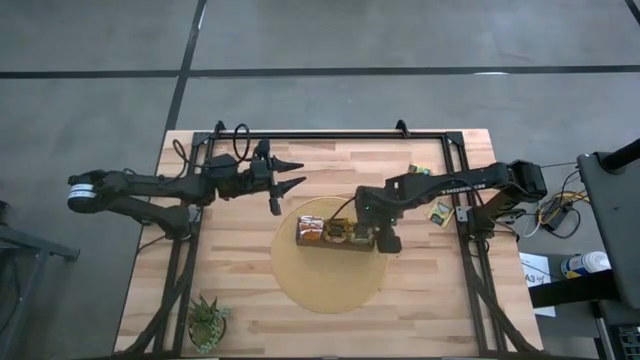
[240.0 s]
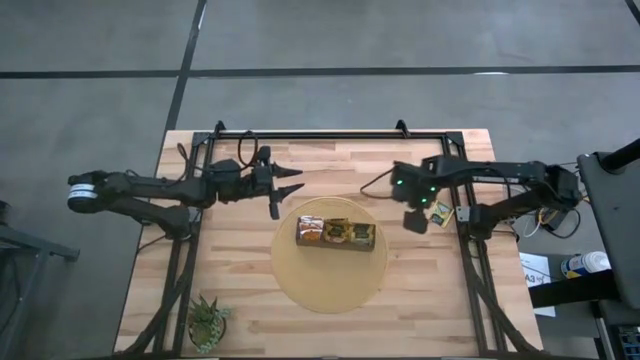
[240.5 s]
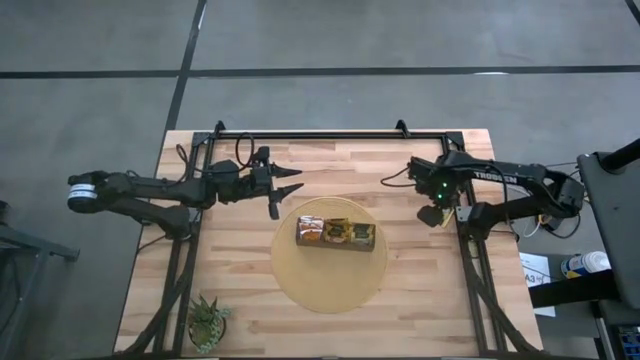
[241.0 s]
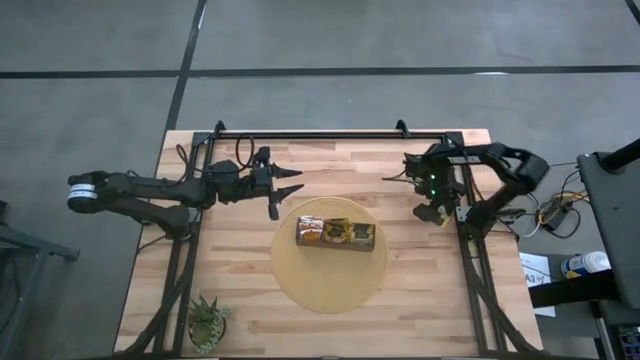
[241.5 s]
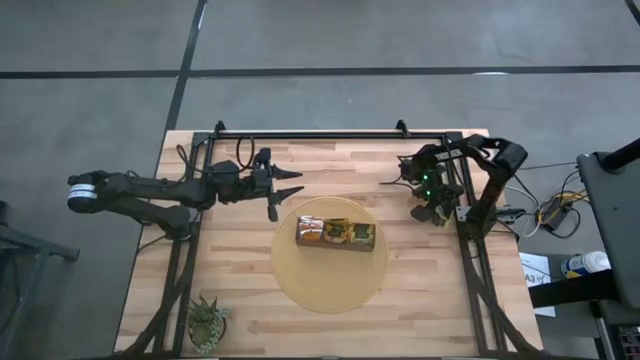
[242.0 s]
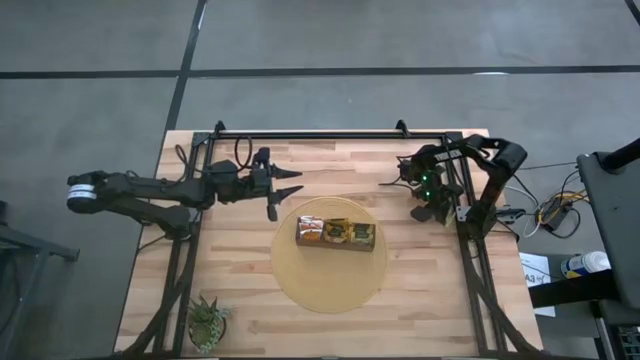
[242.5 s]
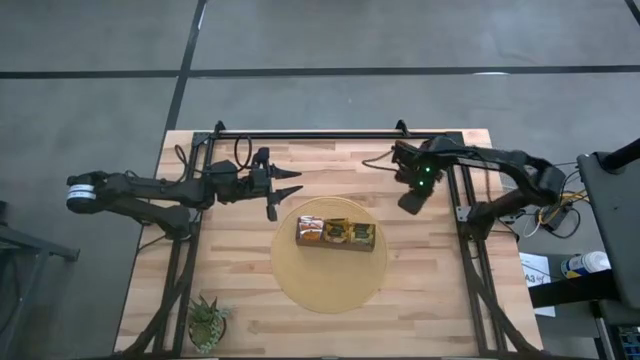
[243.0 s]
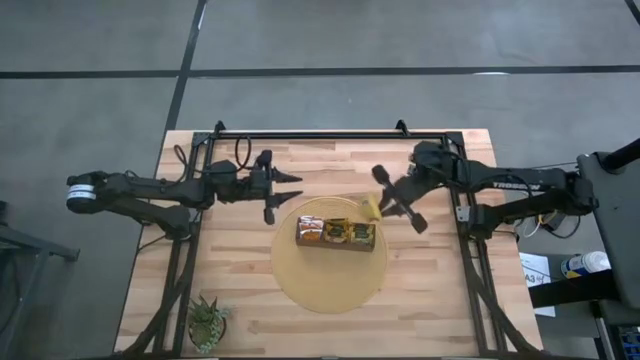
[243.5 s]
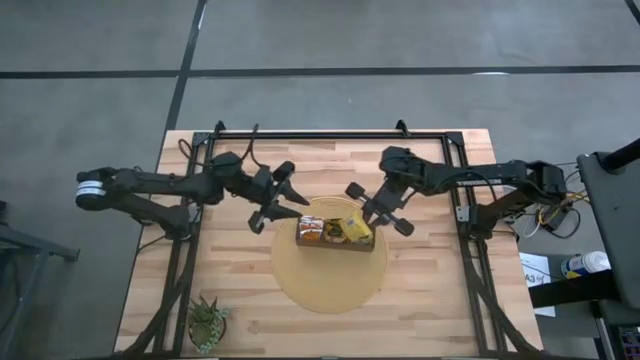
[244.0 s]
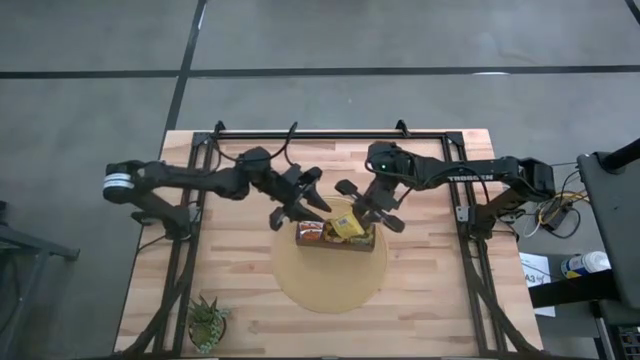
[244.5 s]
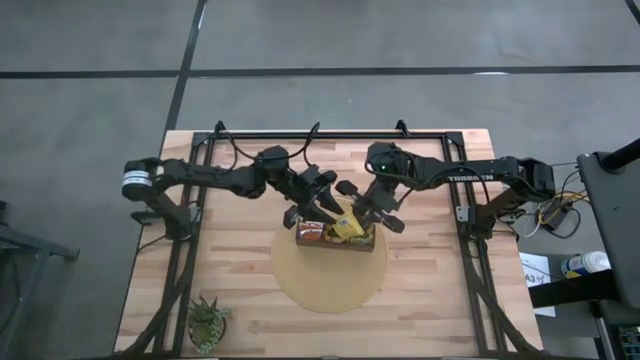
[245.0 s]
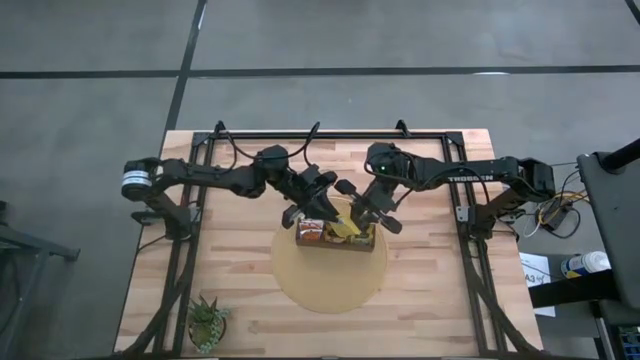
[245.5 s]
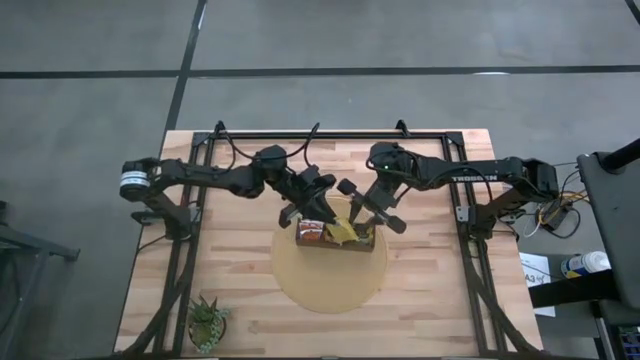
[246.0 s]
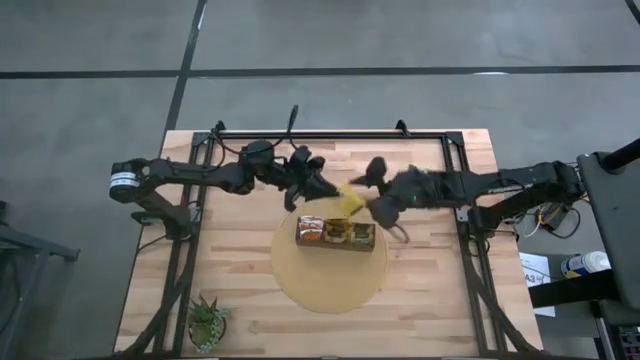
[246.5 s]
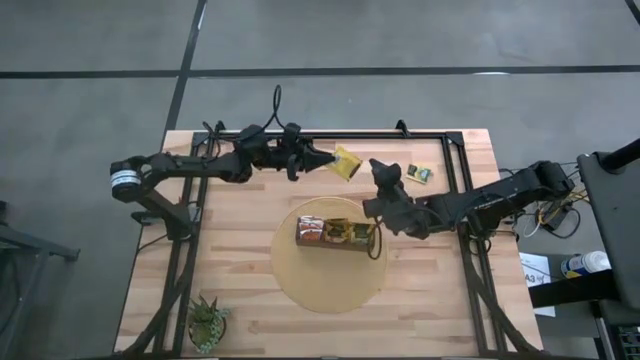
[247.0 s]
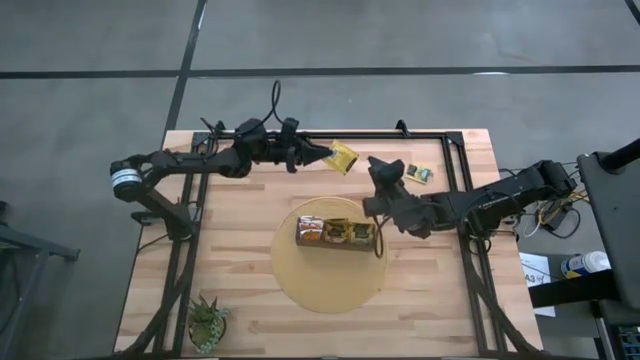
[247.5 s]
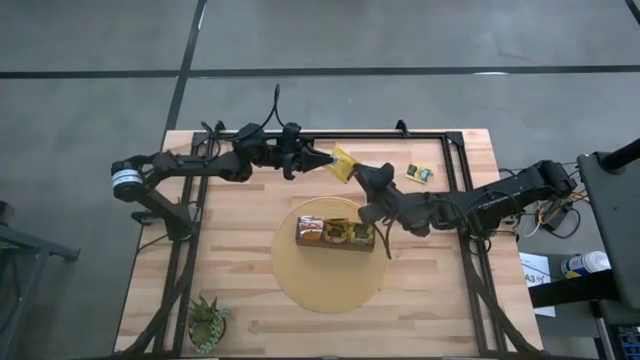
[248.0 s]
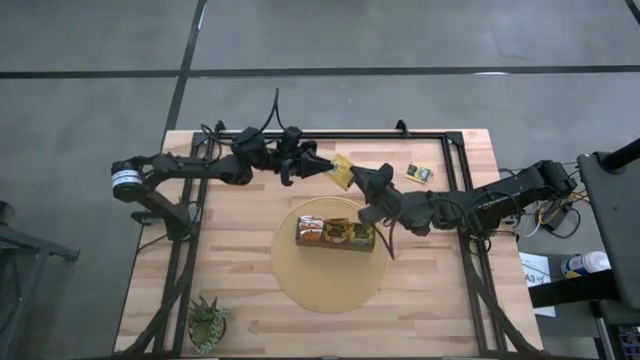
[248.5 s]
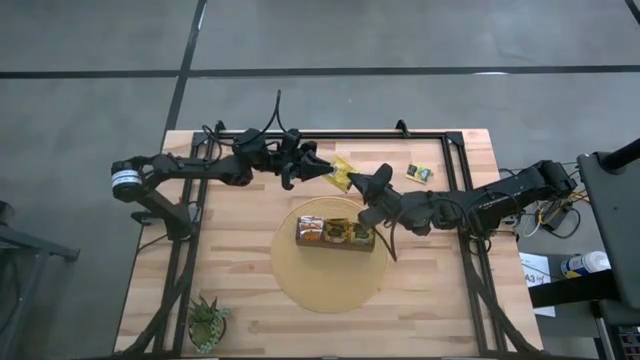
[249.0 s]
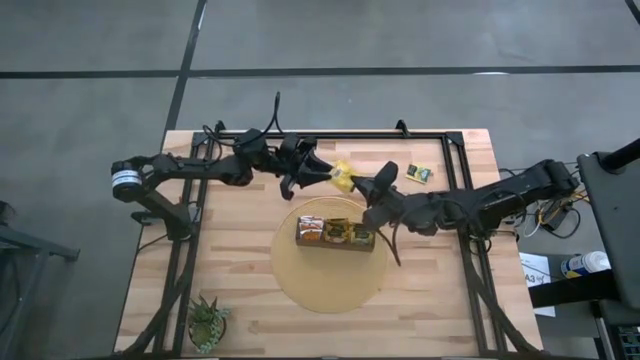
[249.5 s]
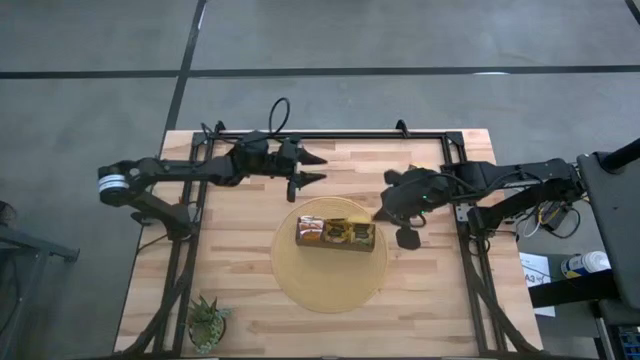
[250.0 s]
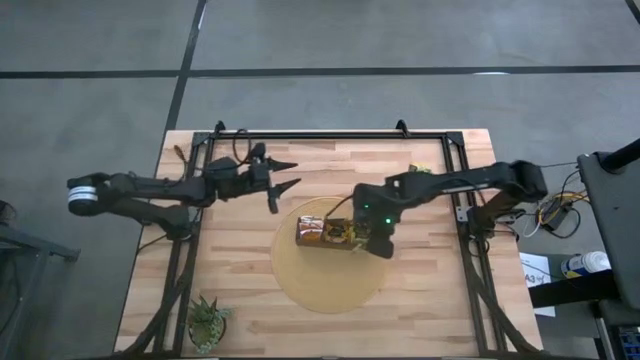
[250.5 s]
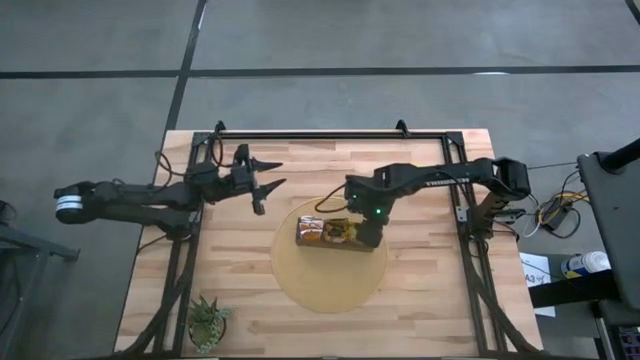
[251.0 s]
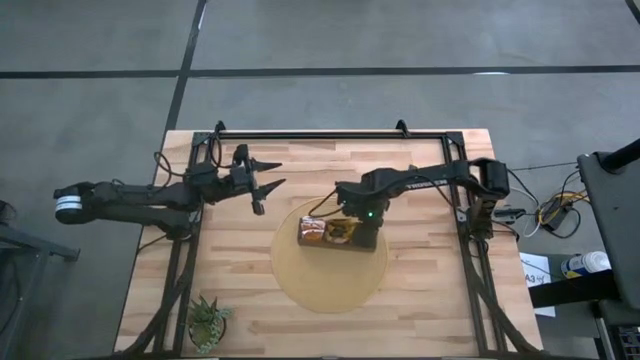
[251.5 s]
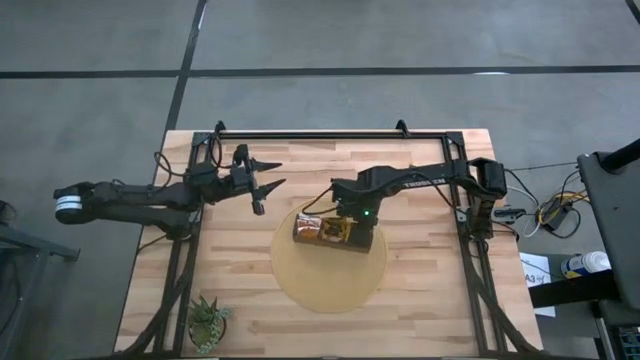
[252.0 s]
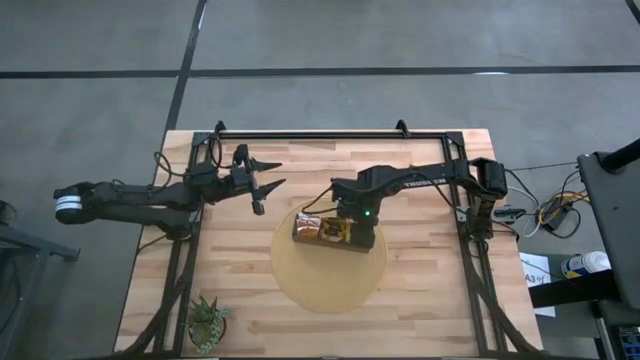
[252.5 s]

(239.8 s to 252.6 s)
Task: Pick & Place Tea
Put the yellow tea bag into the right section of the wooden organizer

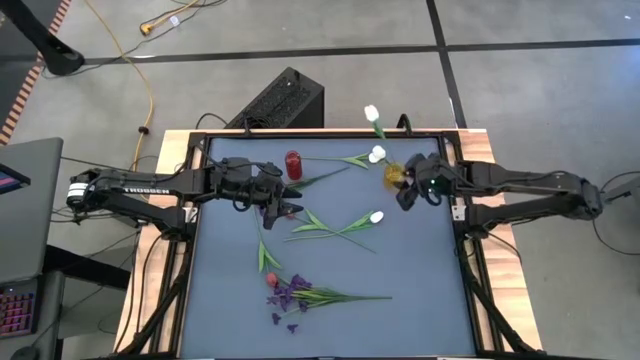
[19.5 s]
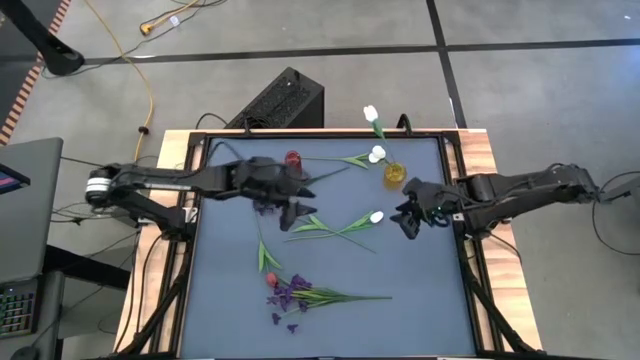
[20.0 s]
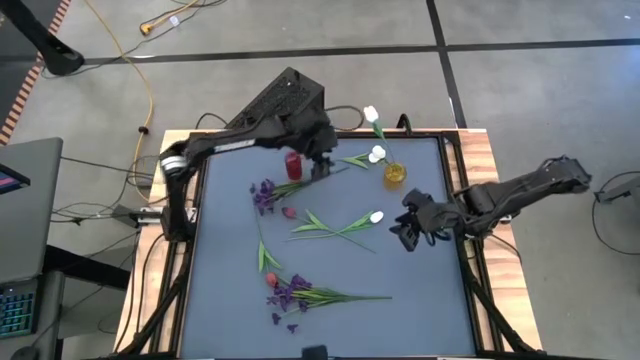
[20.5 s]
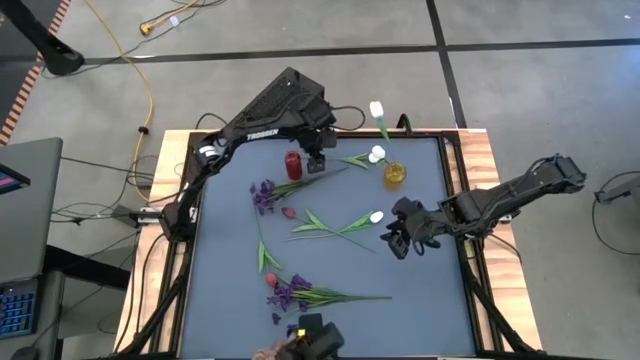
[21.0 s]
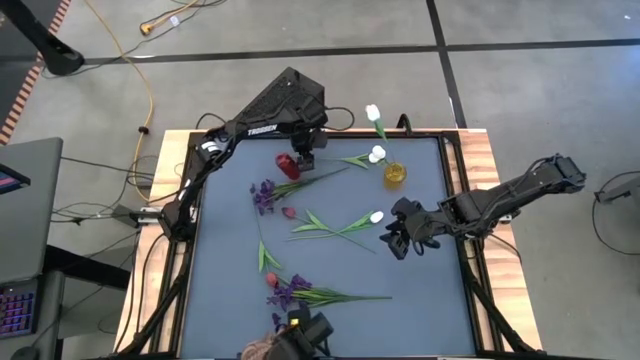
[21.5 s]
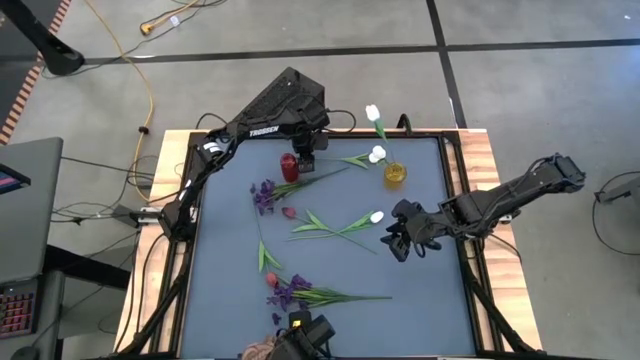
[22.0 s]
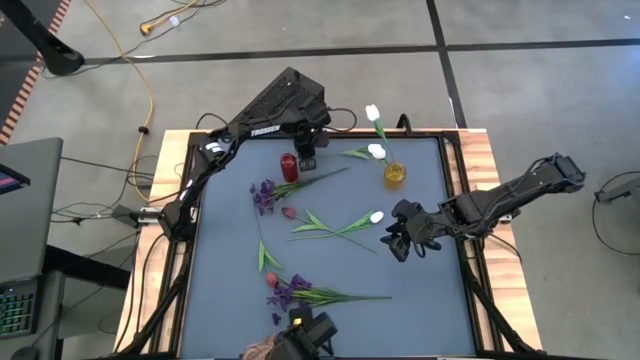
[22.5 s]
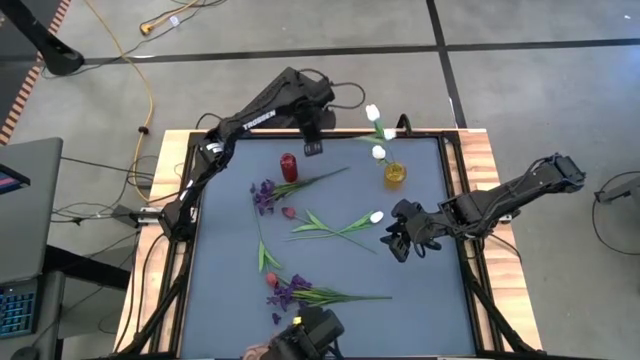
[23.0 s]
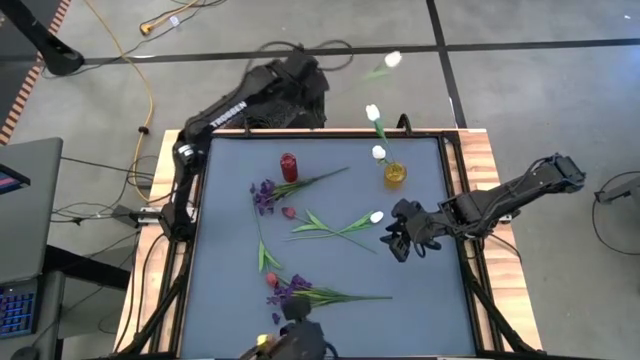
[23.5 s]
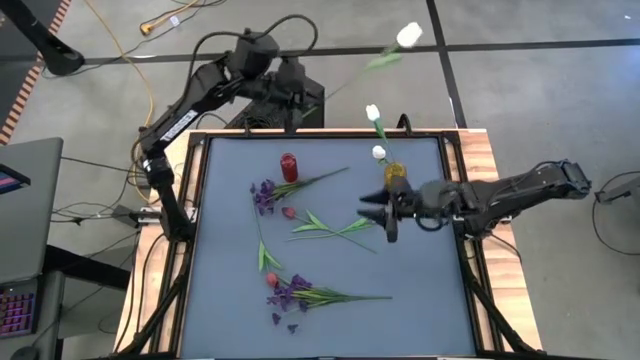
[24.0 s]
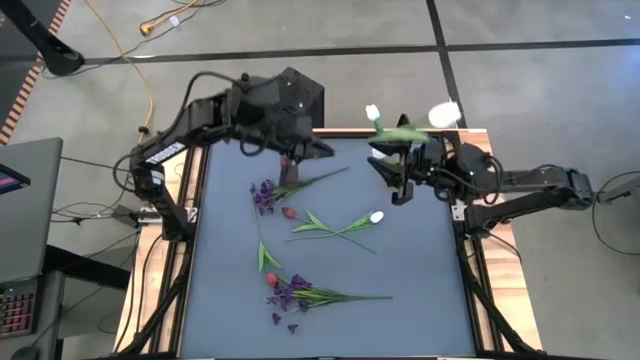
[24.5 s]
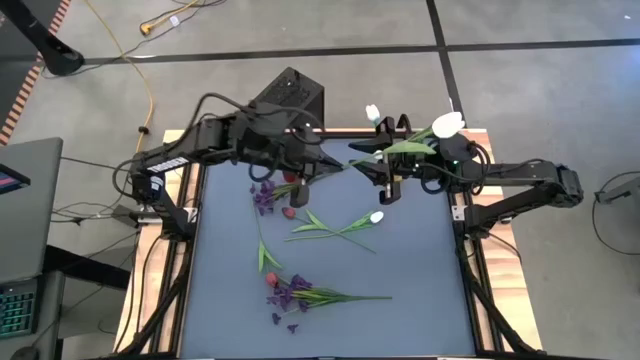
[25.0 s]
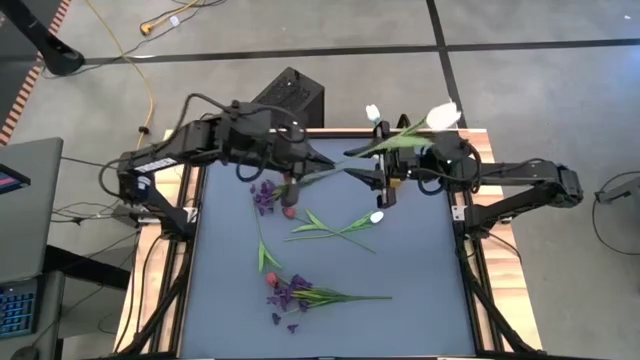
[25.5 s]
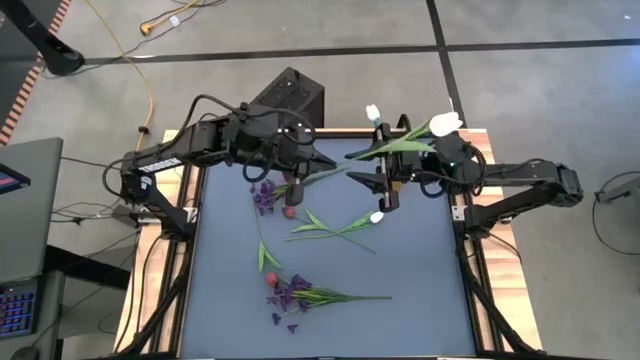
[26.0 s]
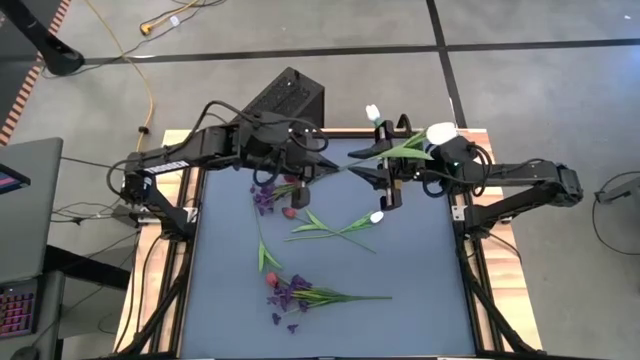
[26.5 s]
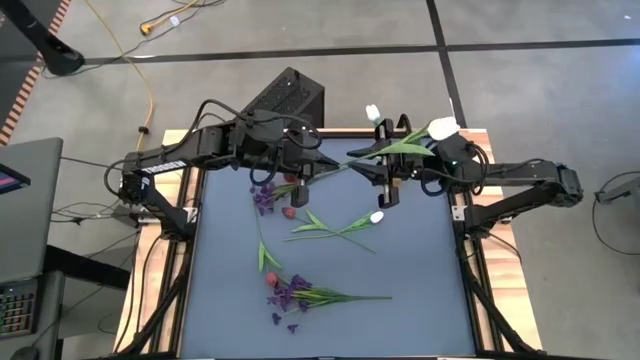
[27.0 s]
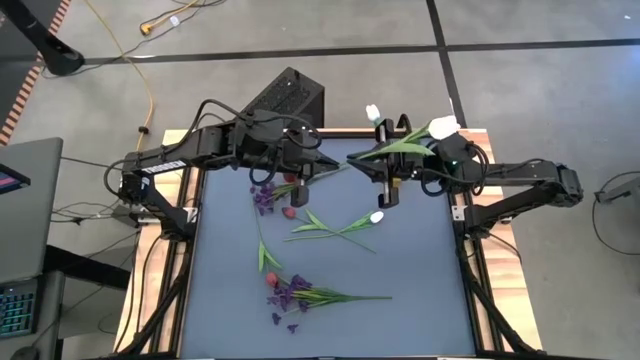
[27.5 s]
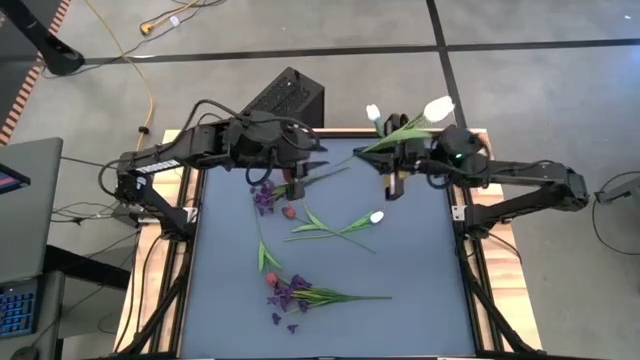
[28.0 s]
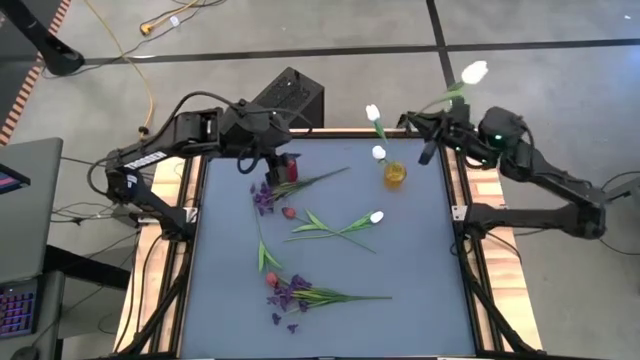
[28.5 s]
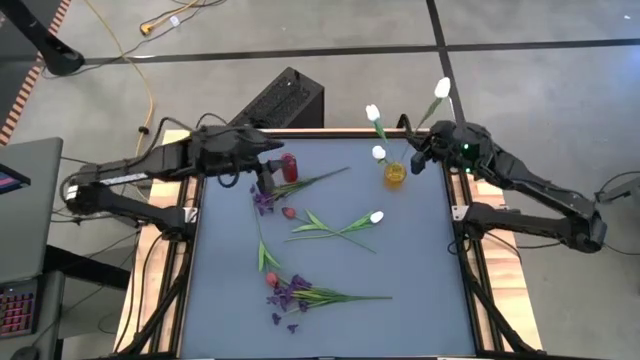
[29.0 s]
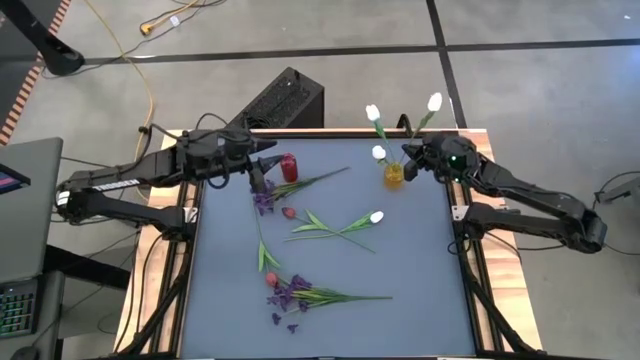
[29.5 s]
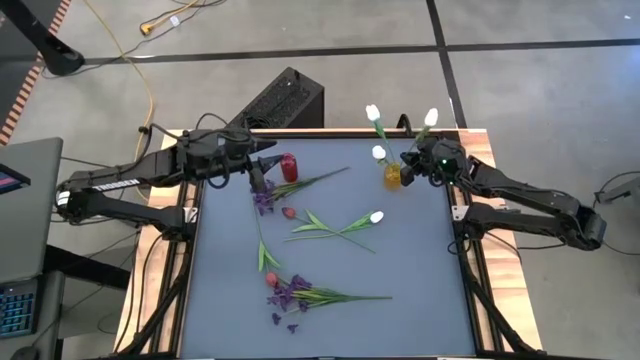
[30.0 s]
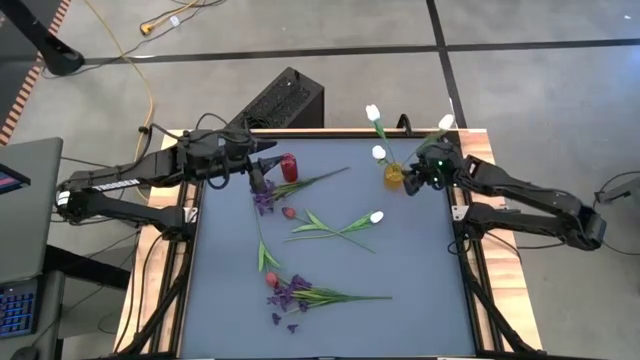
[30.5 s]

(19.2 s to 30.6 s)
Task: Sort flowers into vase by color
Put the white flower into the yellow vase
